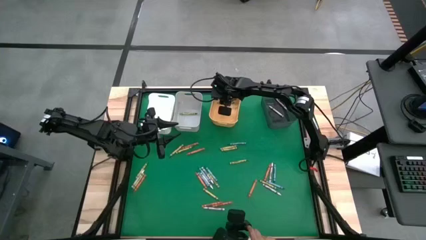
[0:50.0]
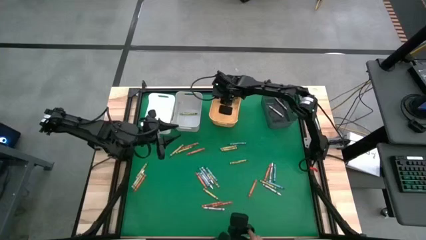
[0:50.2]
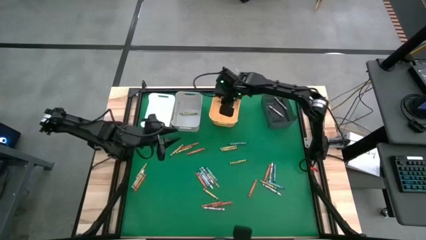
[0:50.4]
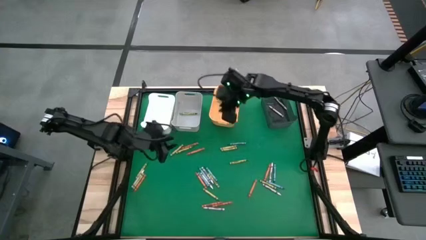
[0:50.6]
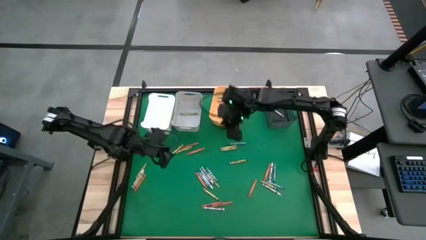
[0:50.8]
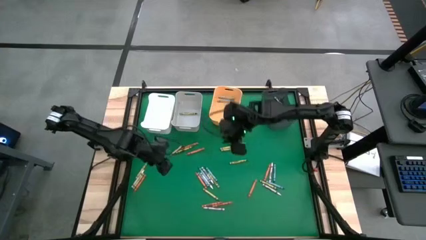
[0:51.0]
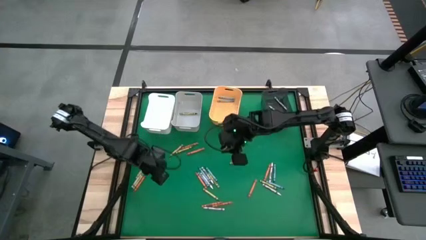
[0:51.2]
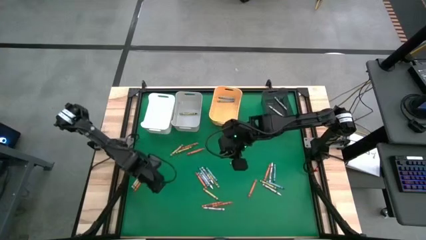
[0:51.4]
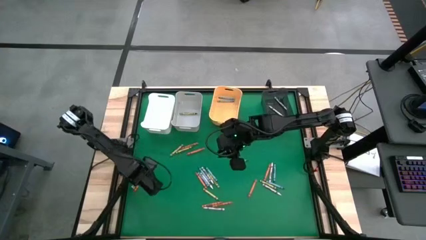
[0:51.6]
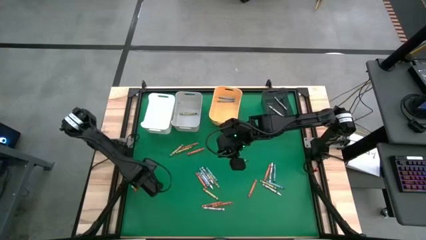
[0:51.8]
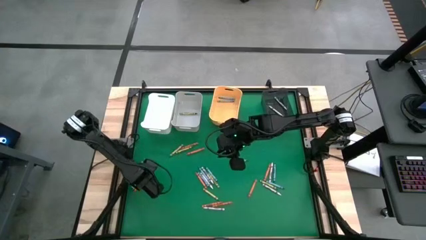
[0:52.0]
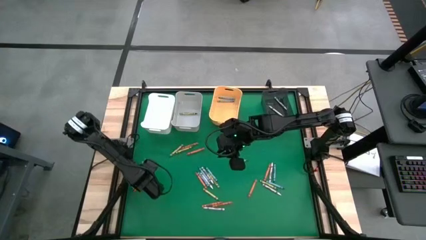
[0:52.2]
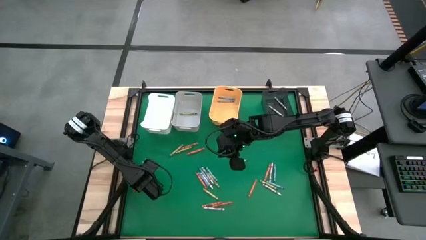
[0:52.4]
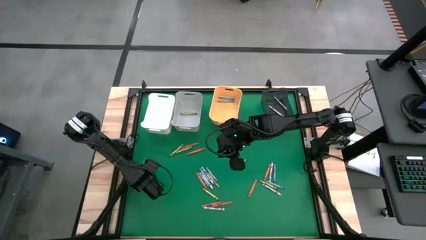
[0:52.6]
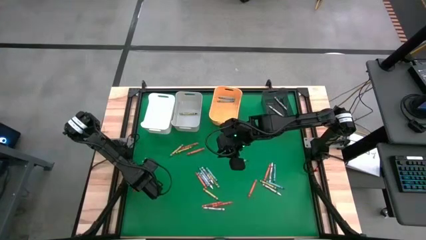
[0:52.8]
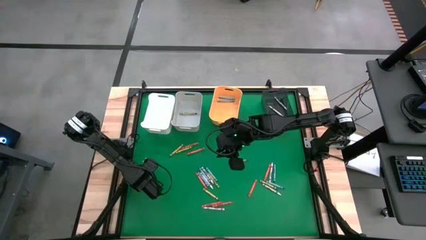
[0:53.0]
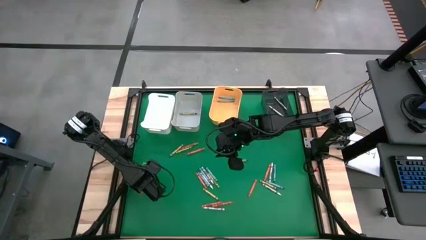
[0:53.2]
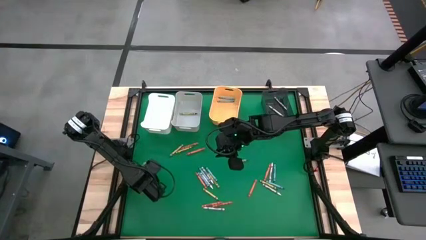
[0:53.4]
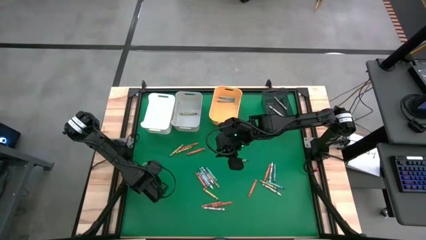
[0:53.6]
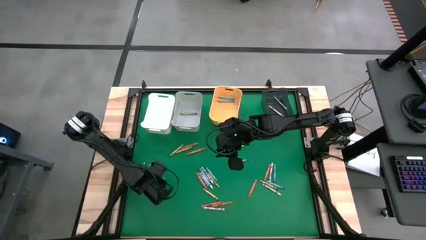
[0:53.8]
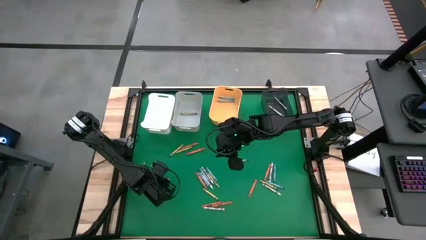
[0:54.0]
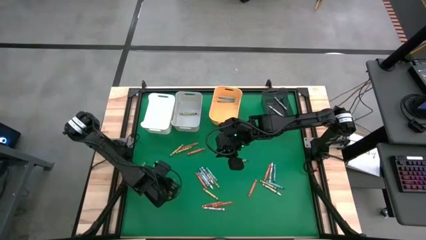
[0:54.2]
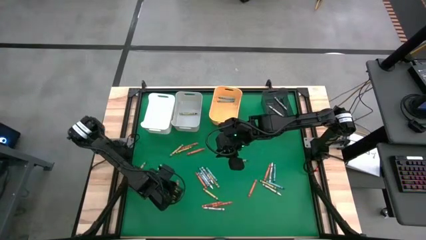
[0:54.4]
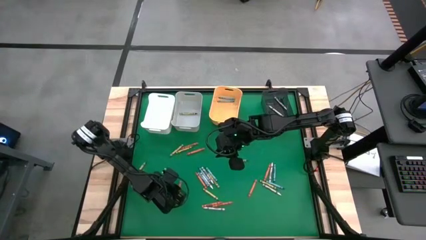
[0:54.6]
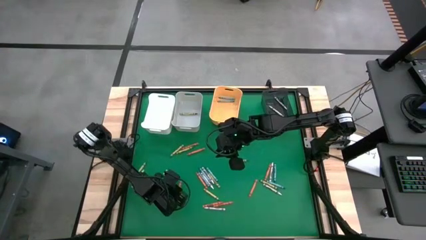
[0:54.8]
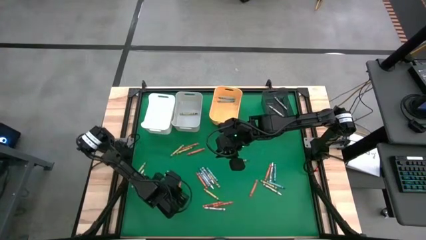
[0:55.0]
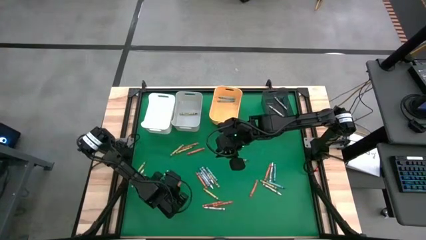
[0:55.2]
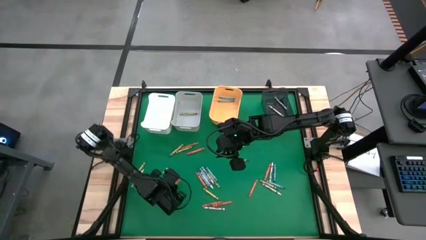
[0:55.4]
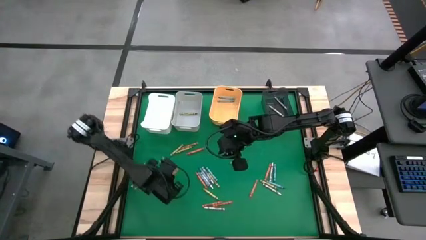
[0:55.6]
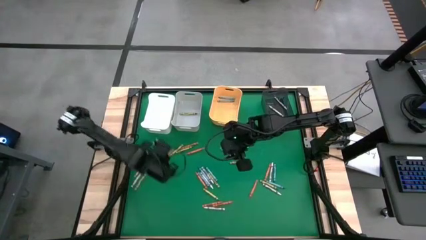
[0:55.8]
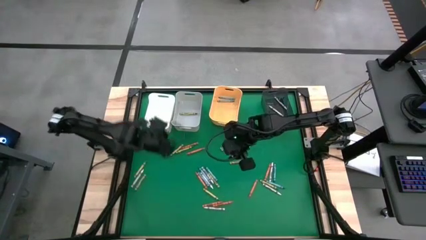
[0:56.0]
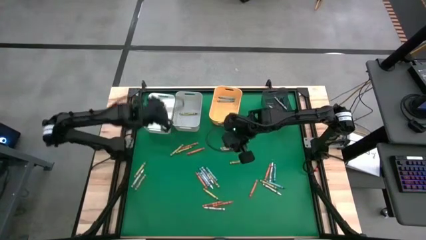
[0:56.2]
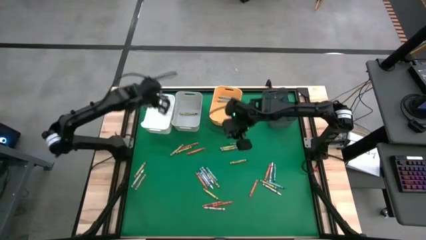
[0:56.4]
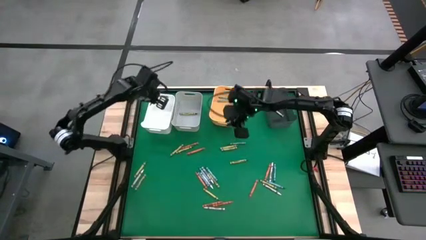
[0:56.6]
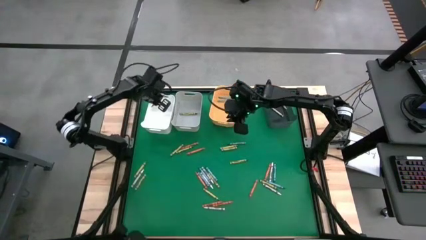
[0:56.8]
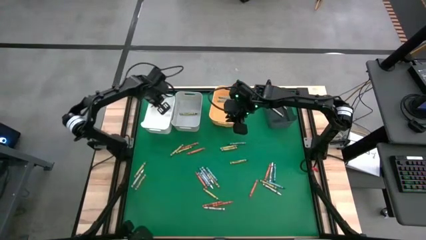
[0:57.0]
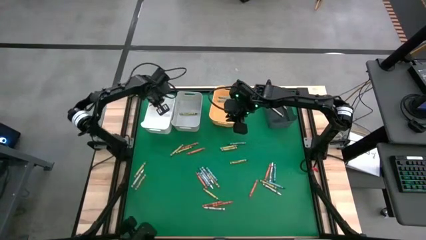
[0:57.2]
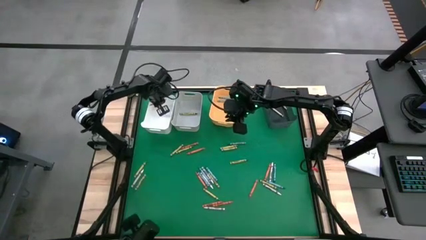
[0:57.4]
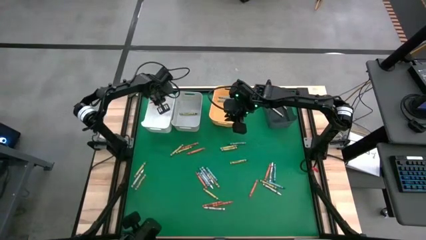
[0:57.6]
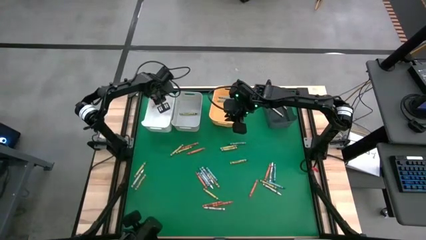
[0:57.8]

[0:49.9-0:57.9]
Task: Sort crayons
Put the orange crayon into the white bin

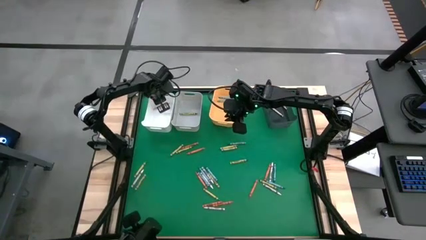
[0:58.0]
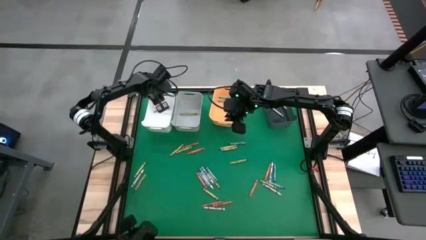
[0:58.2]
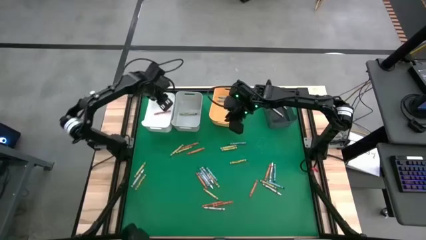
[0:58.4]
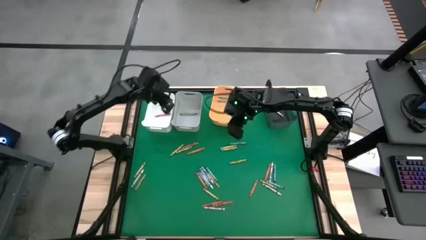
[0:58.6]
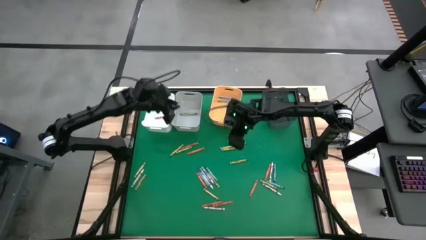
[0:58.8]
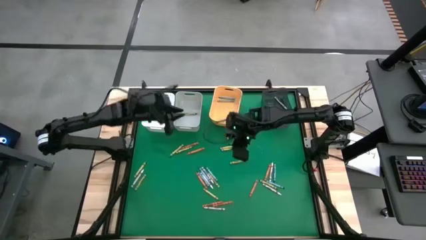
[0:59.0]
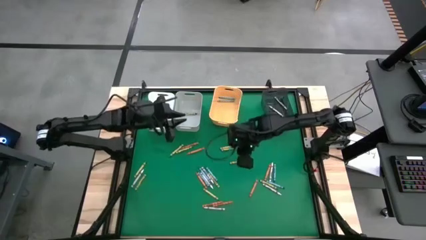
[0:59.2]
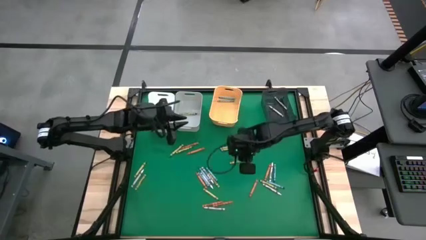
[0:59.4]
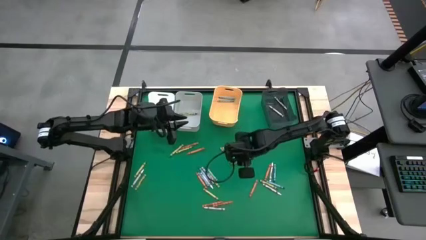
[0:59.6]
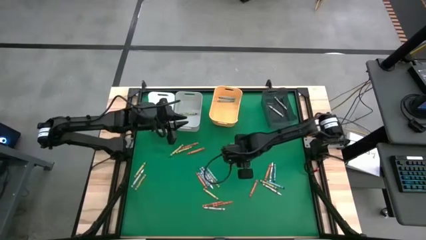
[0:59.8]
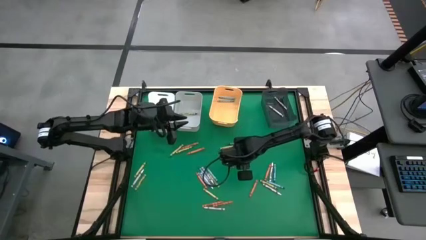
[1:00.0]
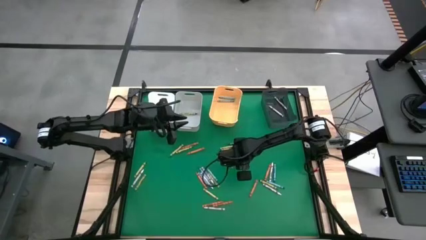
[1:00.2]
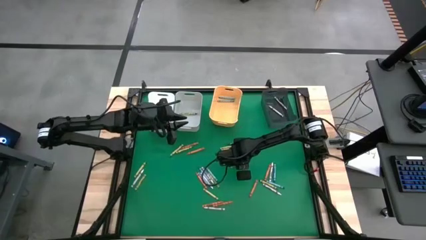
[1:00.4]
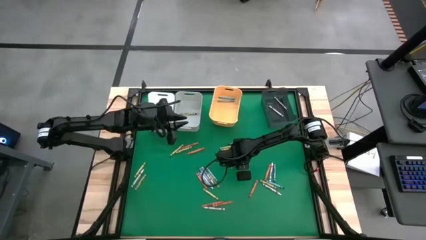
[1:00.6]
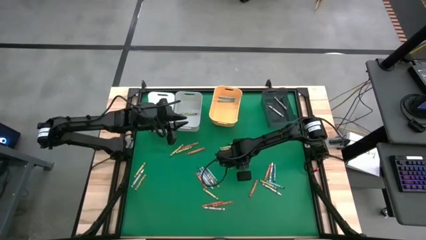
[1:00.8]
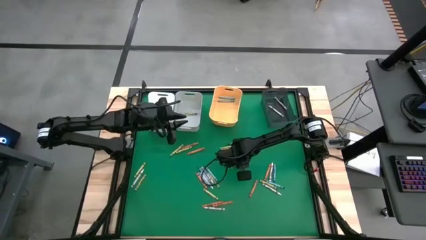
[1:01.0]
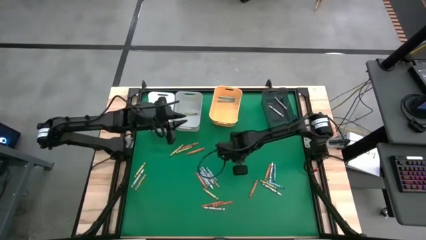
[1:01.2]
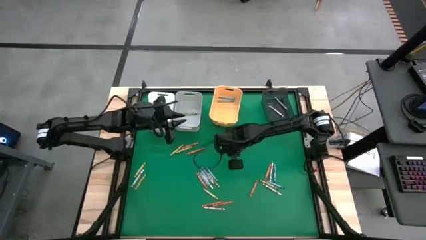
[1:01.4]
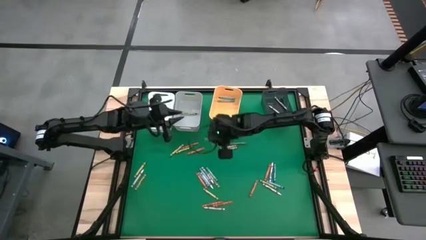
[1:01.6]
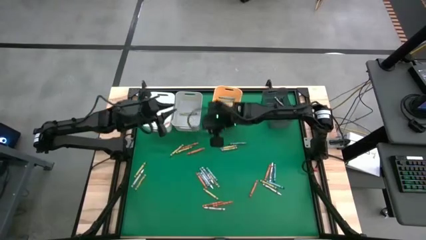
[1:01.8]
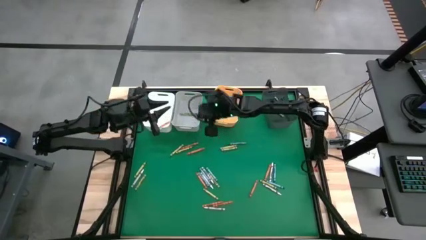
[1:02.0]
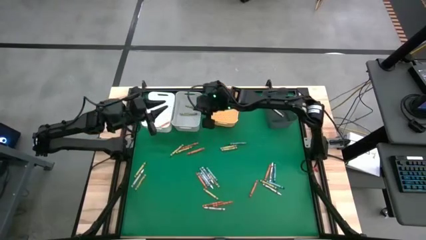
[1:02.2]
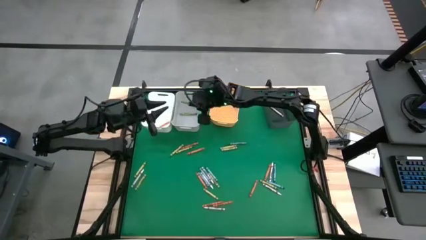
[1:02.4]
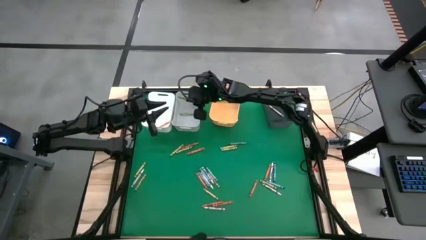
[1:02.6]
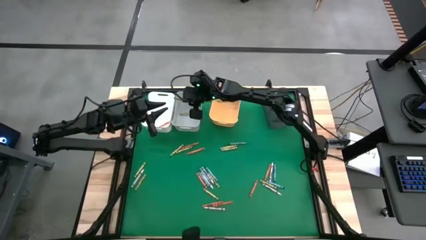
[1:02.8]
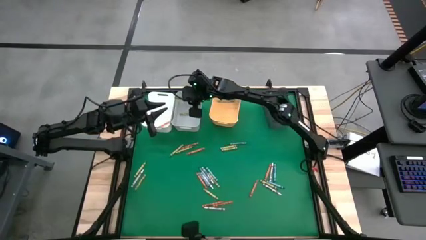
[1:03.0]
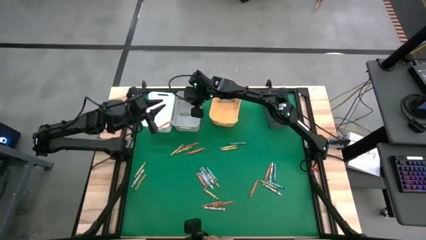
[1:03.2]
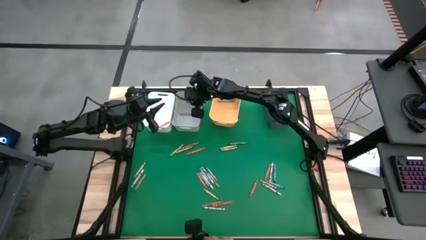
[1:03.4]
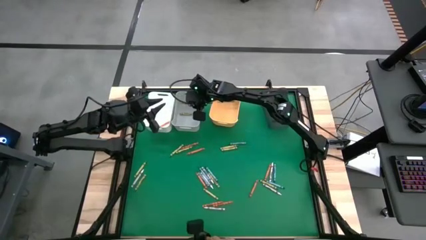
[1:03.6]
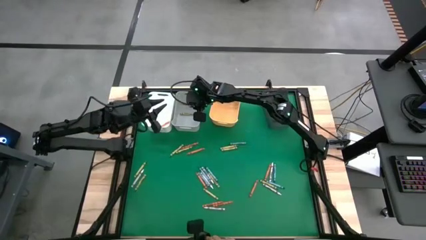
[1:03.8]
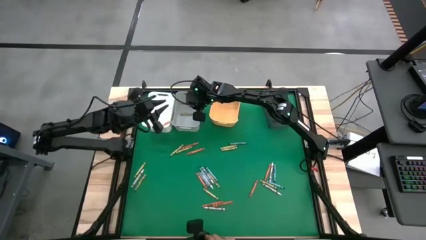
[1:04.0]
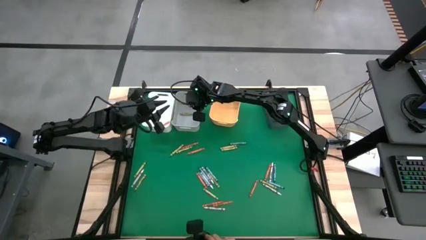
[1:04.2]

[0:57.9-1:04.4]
Put the green crayon into the gray bin

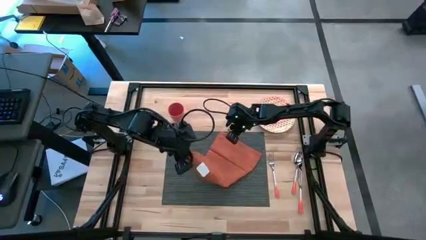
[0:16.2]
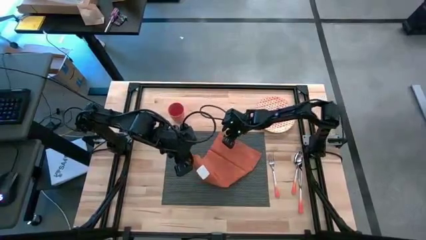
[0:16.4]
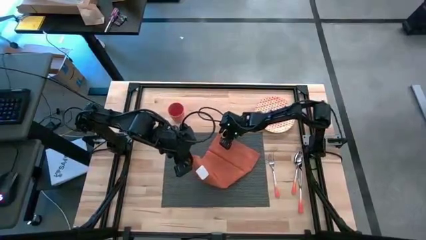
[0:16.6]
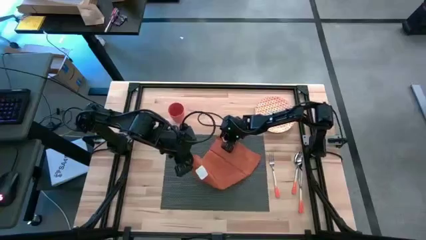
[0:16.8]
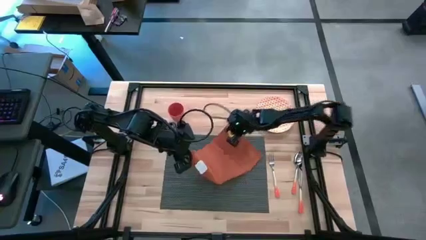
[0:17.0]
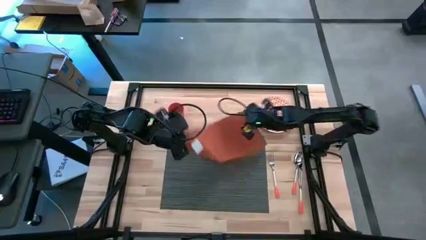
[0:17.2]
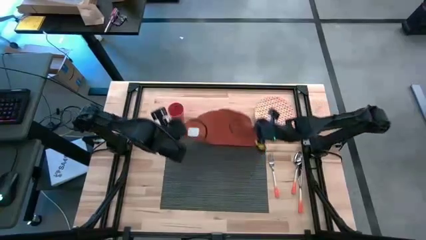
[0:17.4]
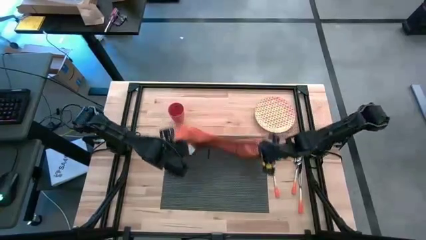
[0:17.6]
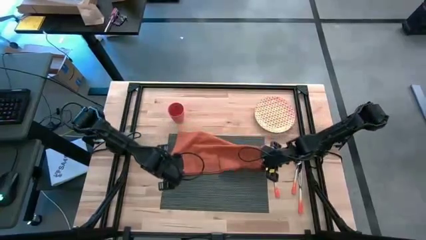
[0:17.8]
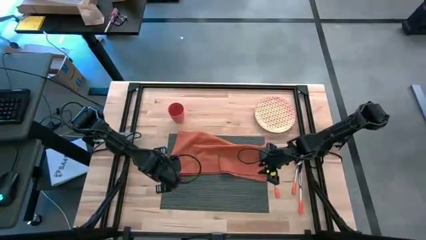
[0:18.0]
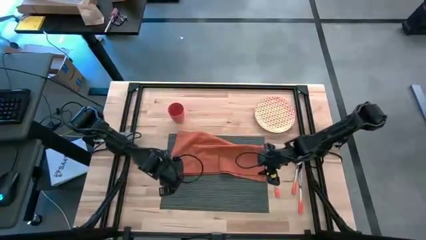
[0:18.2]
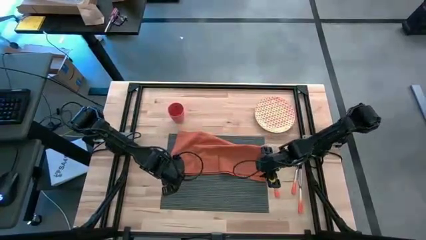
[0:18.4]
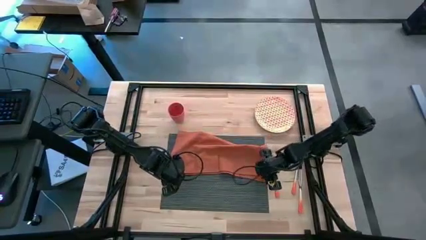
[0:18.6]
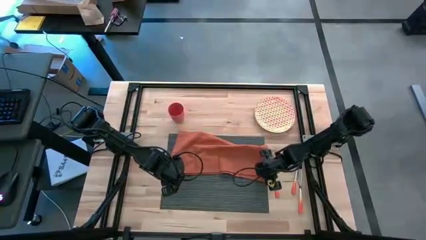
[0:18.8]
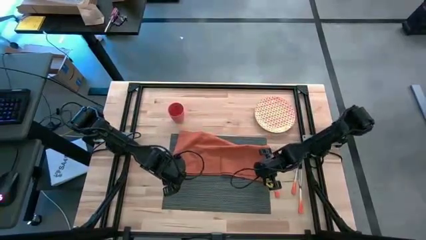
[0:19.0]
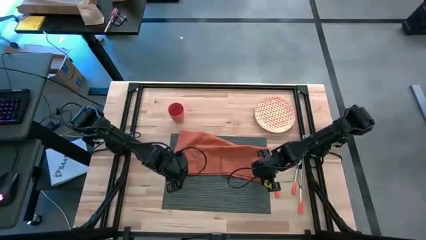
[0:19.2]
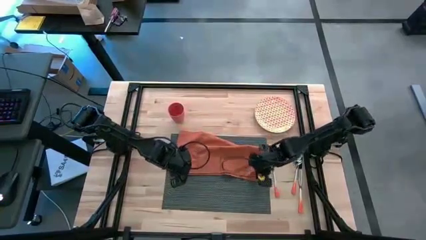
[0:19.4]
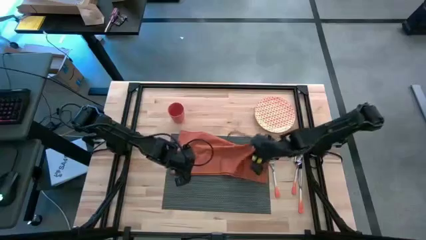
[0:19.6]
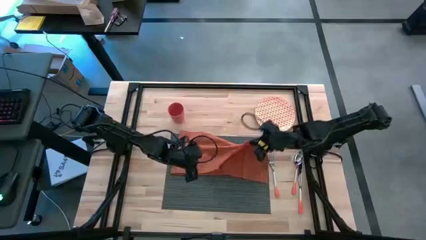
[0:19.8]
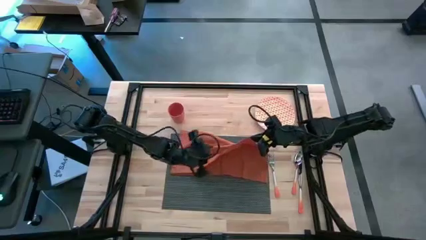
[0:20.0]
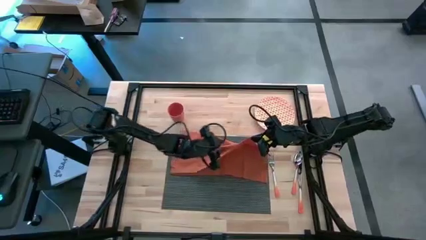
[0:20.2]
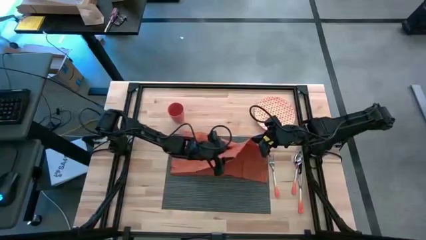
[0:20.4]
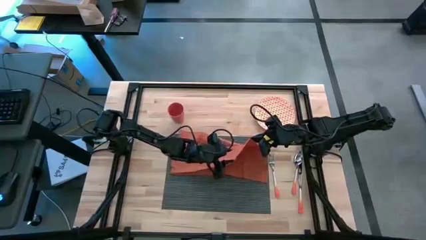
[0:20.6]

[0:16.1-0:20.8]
Task: Set table place
Fold the orange table napkin
